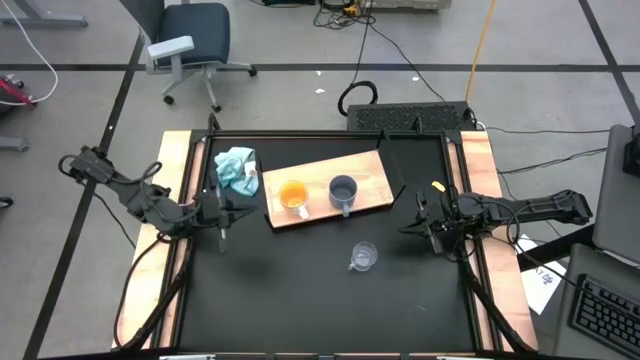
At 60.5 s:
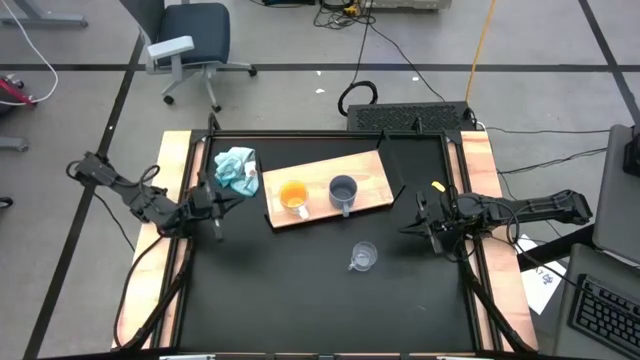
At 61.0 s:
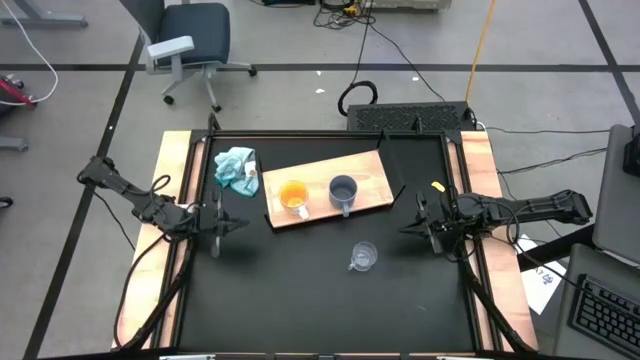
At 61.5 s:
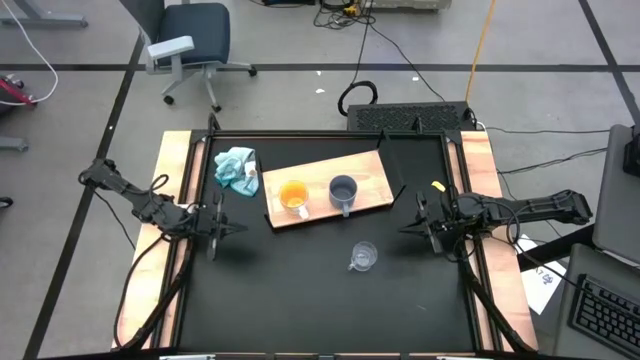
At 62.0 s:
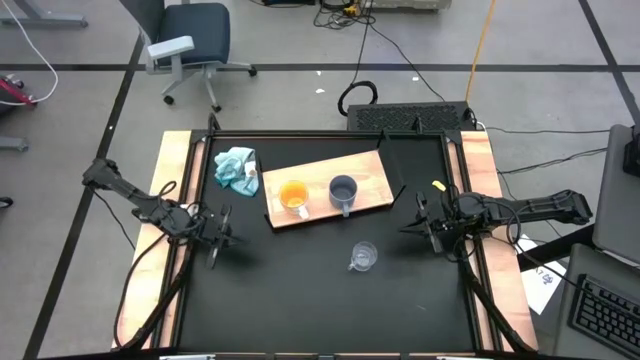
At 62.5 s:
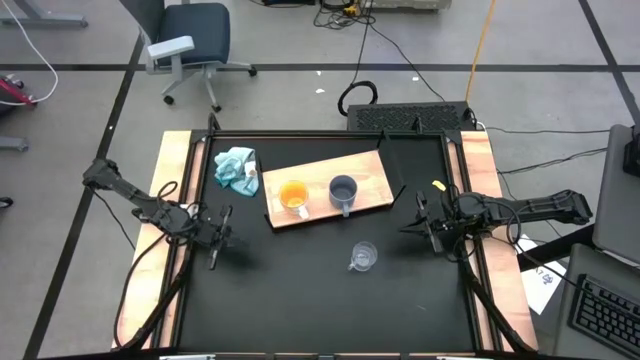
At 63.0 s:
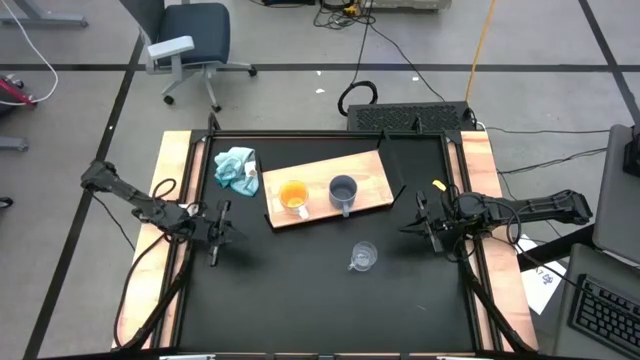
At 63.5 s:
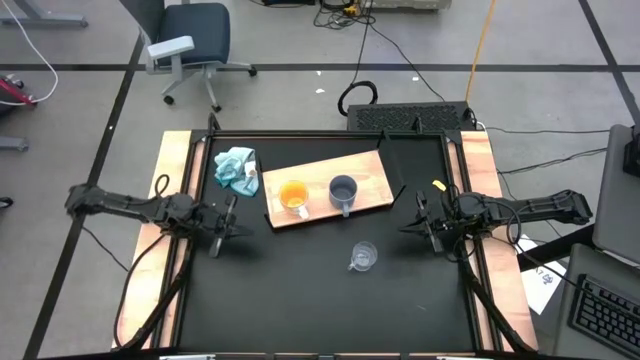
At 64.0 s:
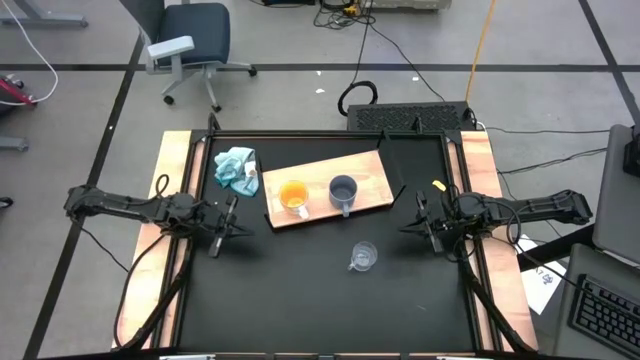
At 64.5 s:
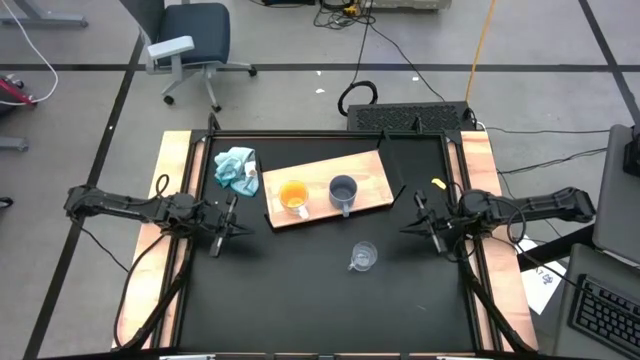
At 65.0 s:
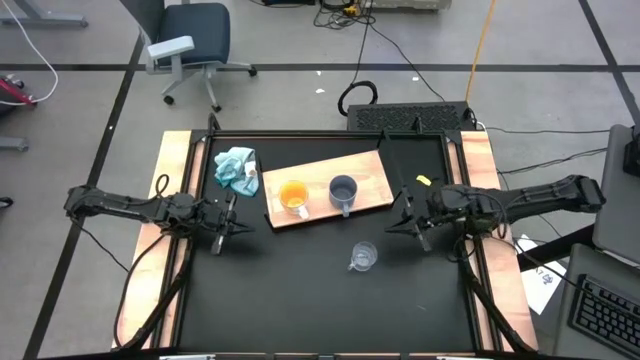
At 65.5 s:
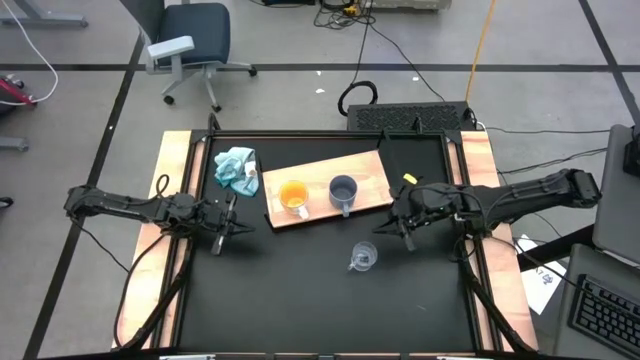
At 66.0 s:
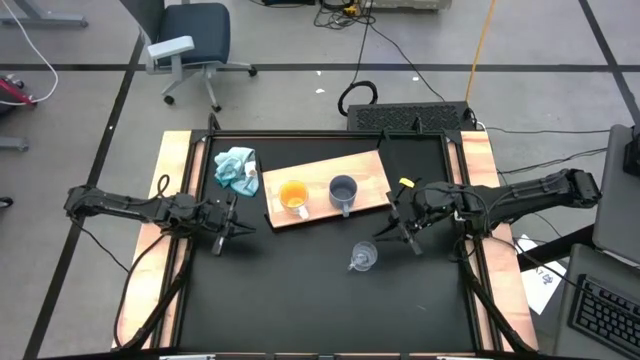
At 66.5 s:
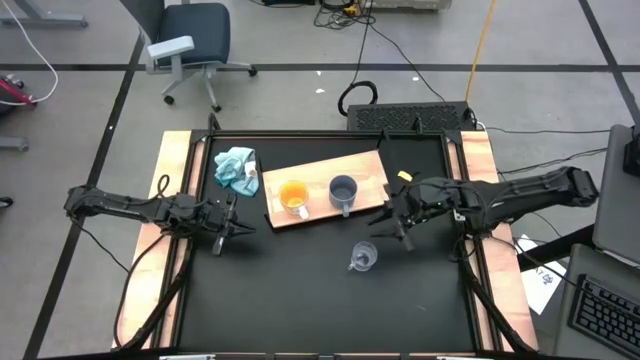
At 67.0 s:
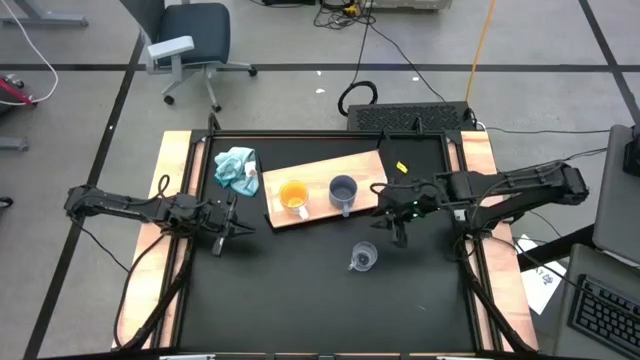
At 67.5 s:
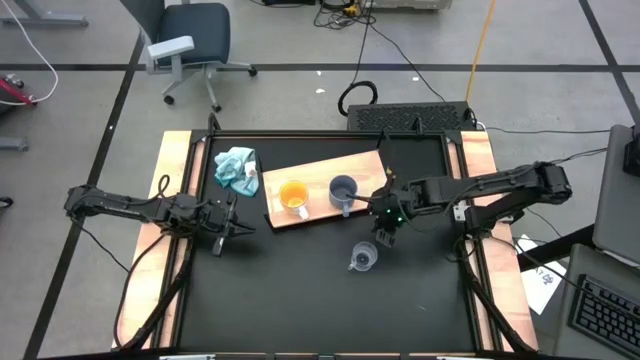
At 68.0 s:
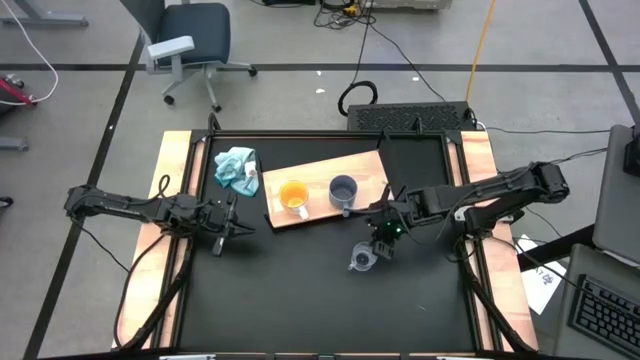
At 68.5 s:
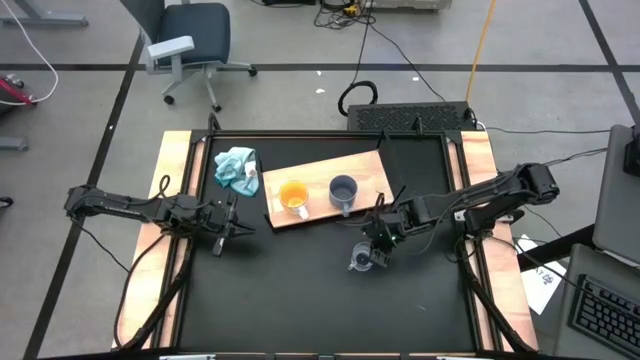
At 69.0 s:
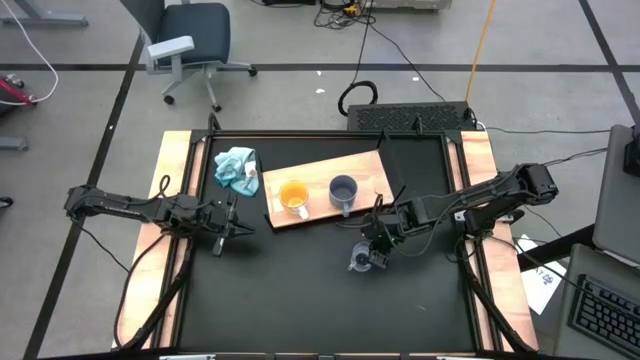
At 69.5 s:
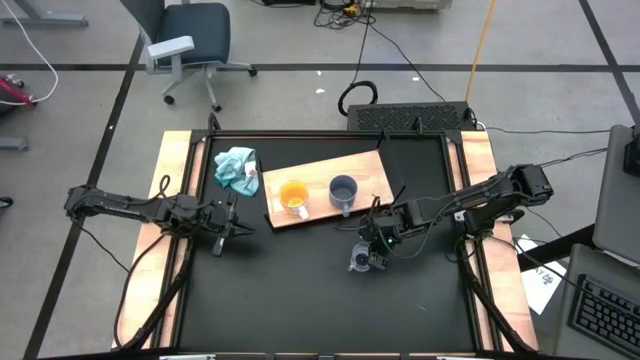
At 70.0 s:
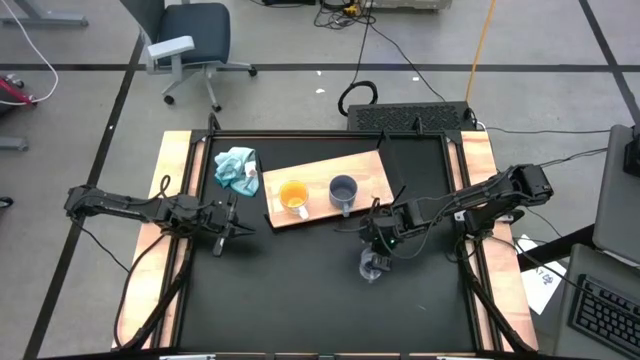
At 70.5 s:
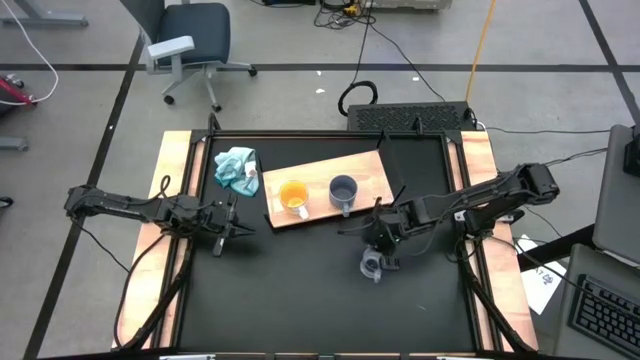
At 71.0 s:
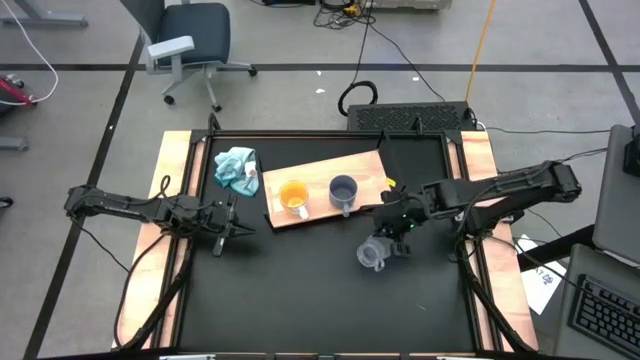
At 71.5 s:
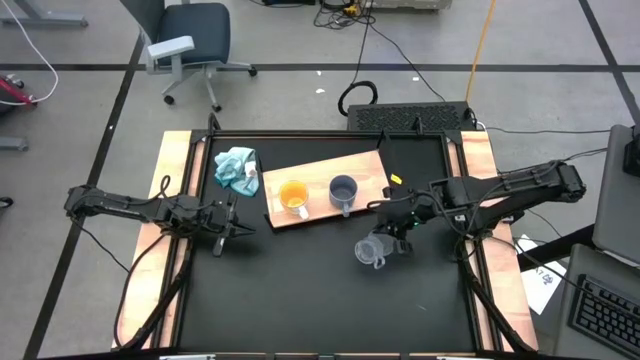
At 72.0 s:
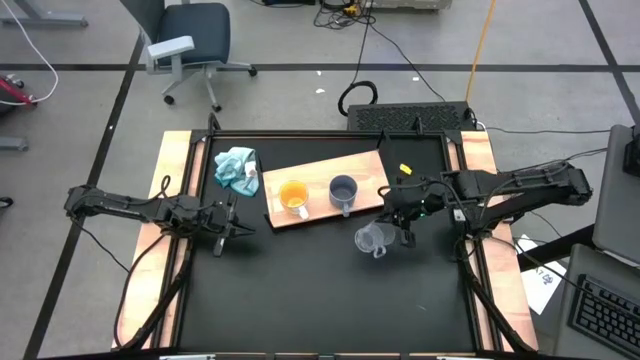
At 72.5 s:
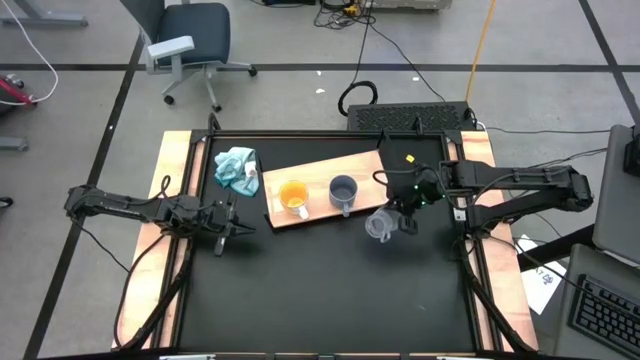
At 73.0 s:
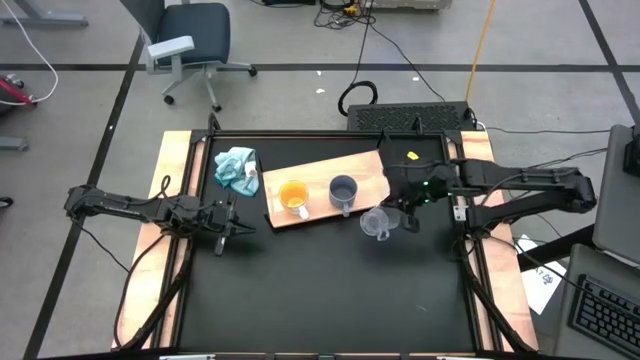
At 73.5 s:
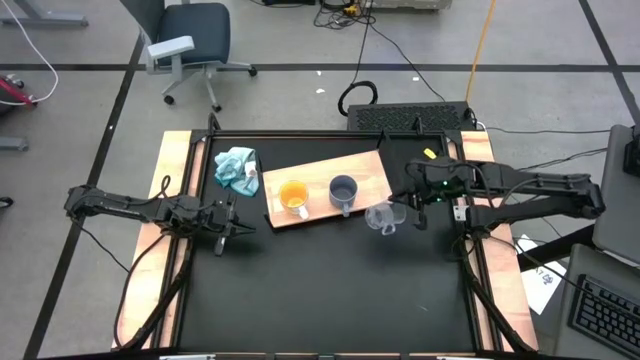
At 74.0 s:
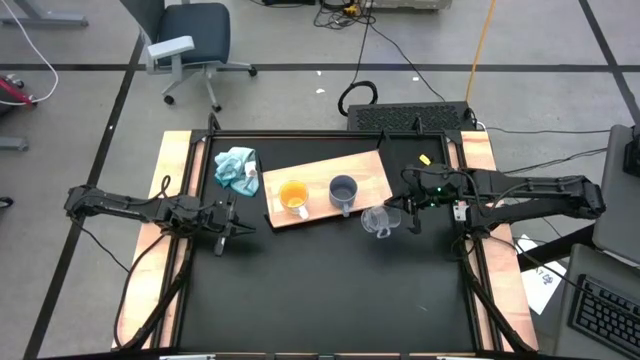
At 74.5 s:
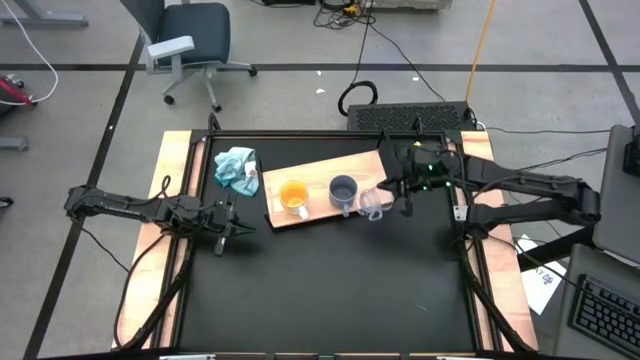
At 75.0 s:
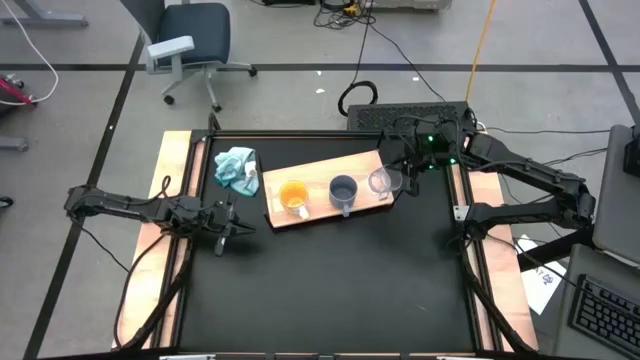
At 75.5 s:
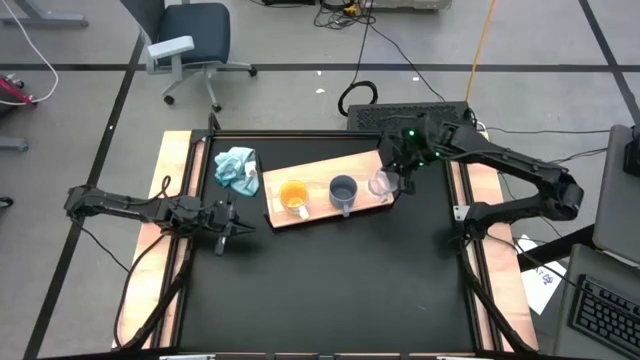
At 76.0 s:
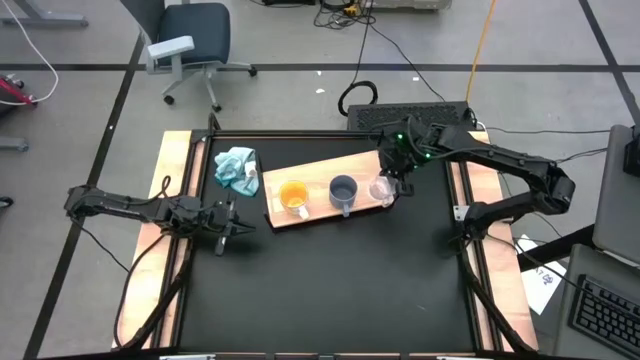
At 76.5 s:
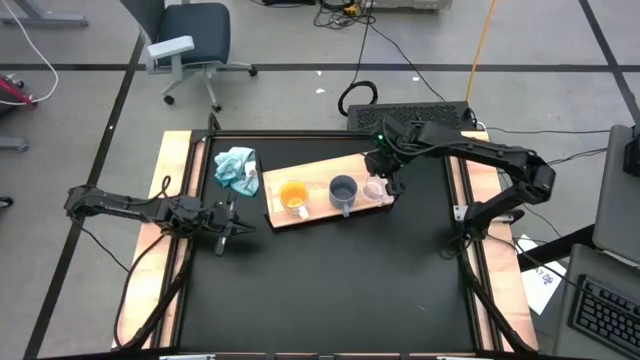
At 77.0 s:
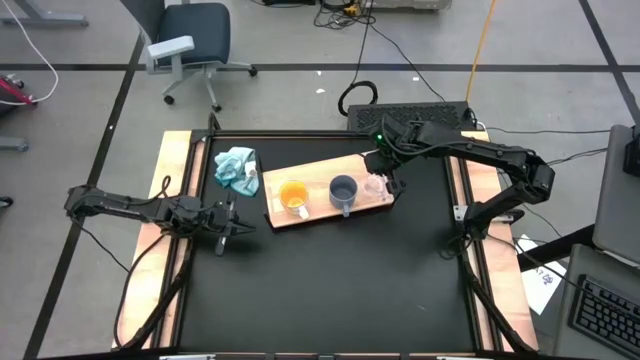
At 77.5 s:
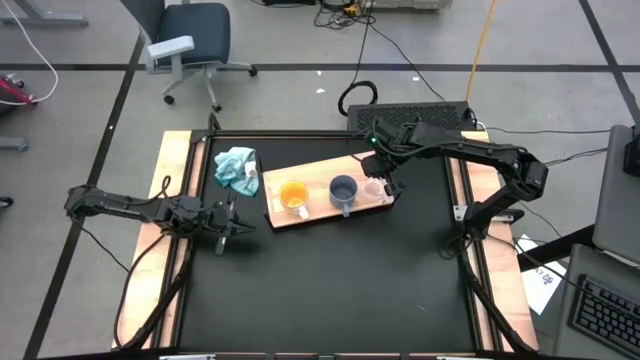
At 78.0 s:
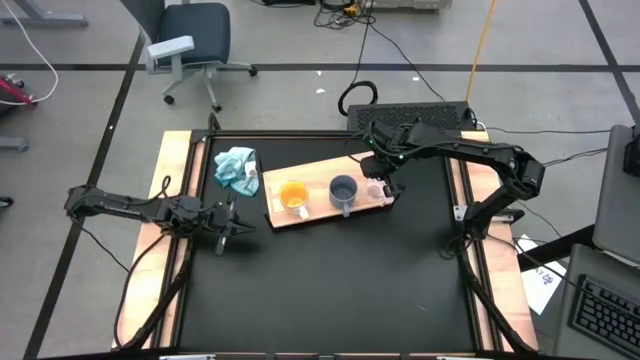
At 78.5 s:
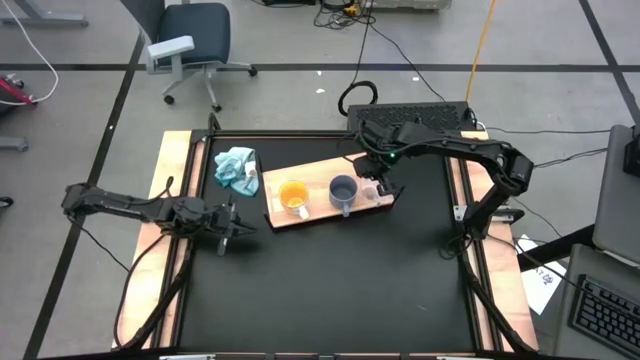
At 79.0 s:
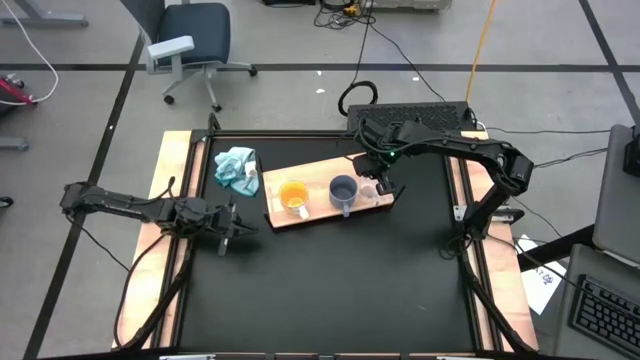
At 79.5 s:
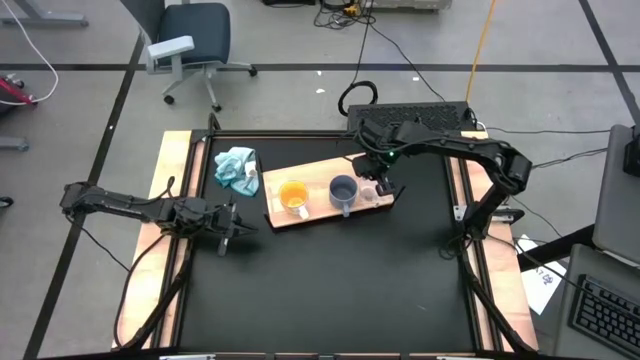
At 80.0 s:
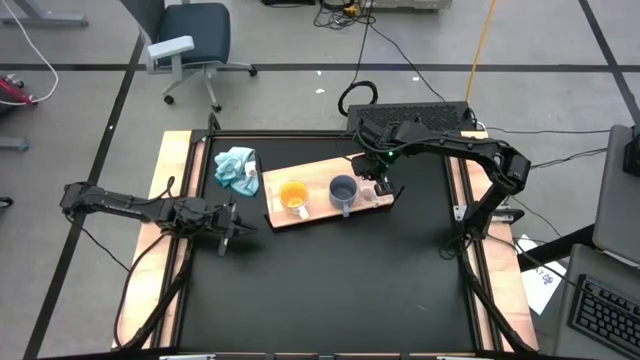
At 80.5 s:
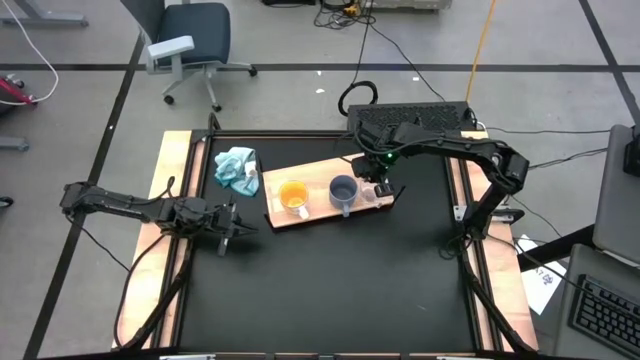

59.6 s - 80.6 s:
Task: Stack small to large cups/mugs on shelf
Put the transparent mug on the shelf
